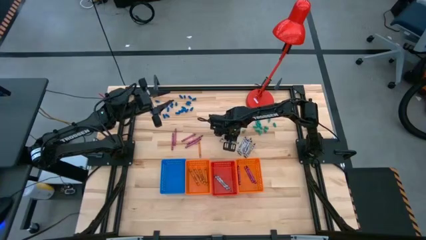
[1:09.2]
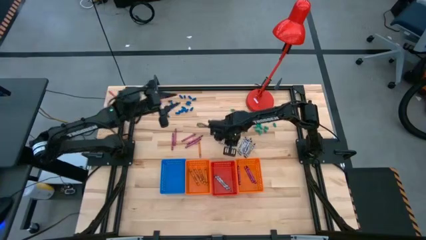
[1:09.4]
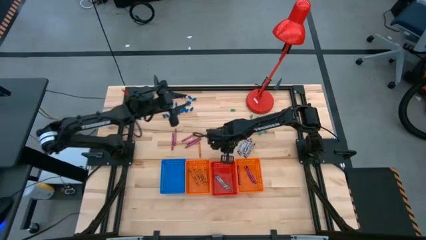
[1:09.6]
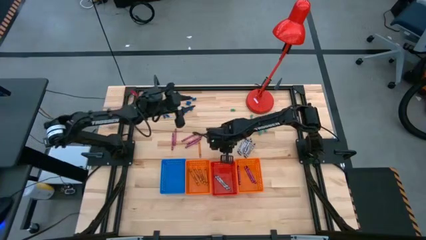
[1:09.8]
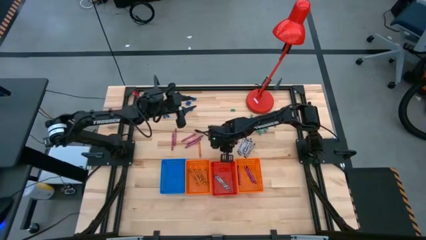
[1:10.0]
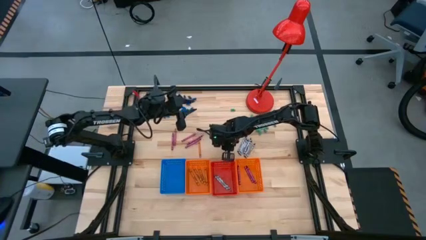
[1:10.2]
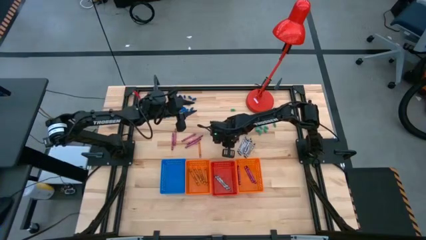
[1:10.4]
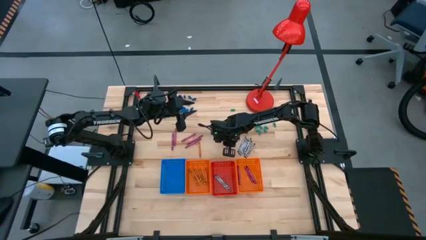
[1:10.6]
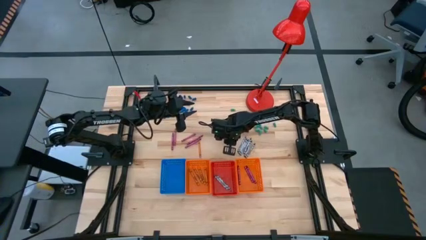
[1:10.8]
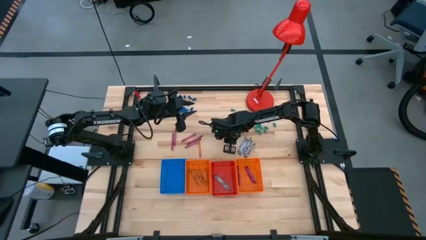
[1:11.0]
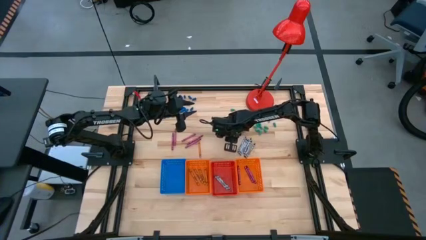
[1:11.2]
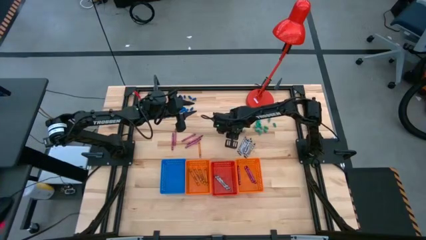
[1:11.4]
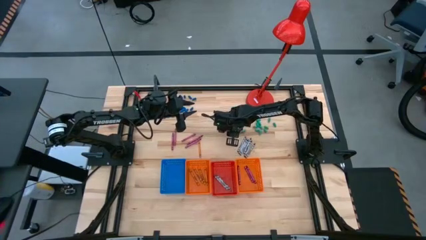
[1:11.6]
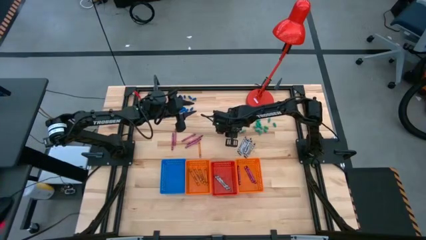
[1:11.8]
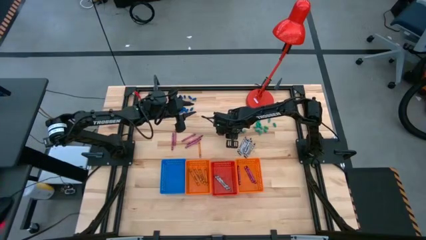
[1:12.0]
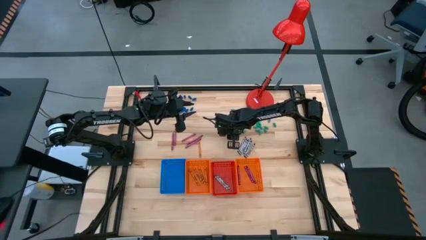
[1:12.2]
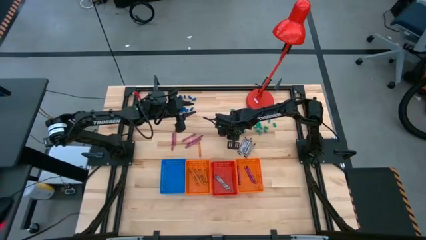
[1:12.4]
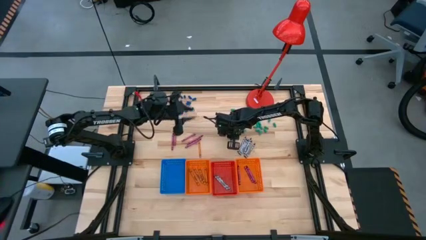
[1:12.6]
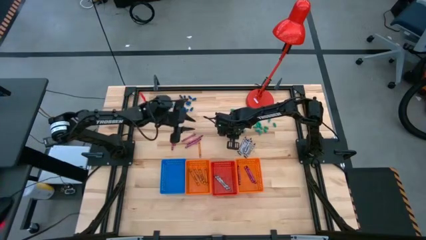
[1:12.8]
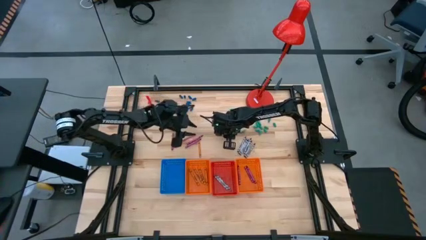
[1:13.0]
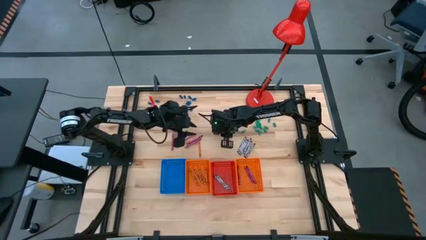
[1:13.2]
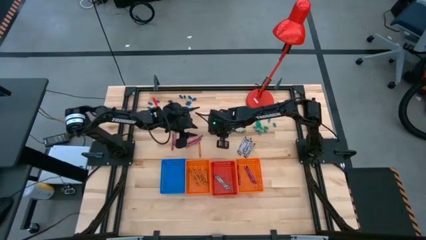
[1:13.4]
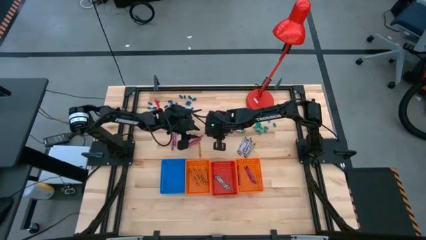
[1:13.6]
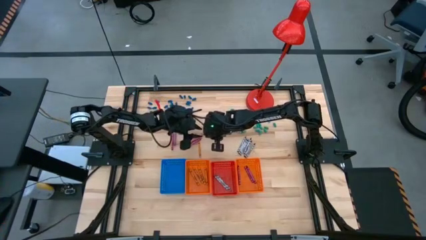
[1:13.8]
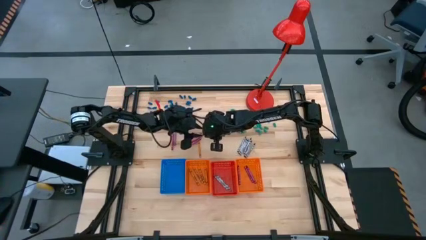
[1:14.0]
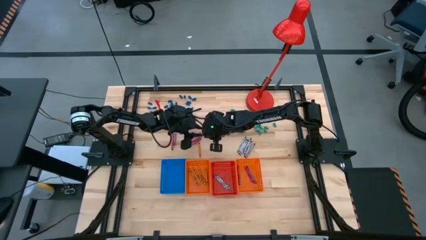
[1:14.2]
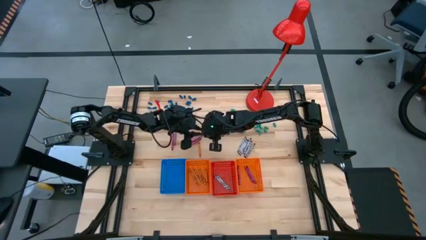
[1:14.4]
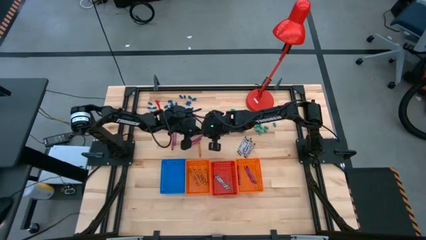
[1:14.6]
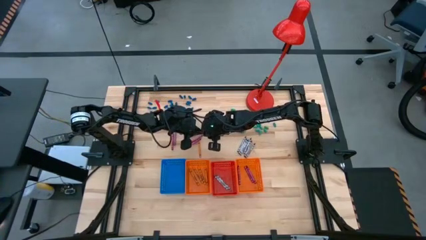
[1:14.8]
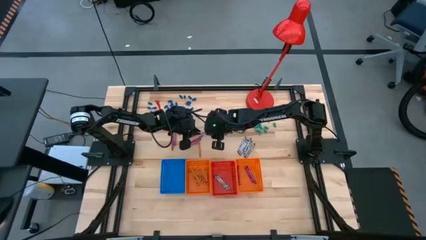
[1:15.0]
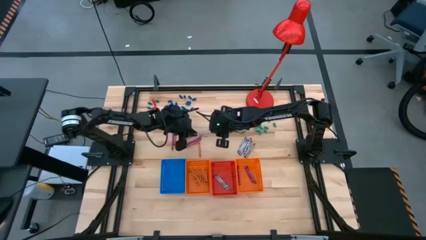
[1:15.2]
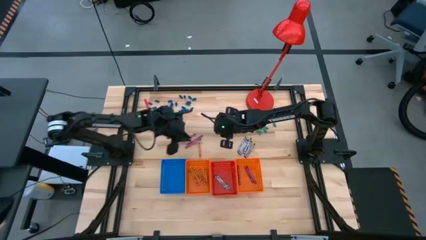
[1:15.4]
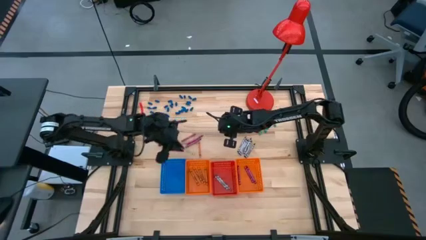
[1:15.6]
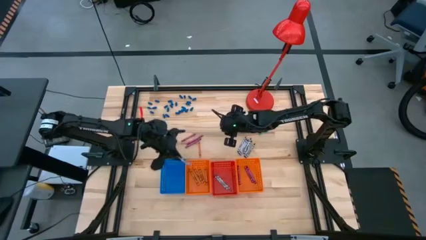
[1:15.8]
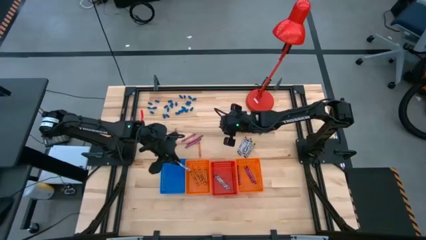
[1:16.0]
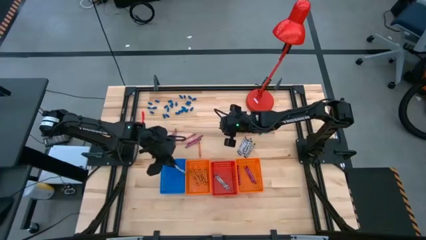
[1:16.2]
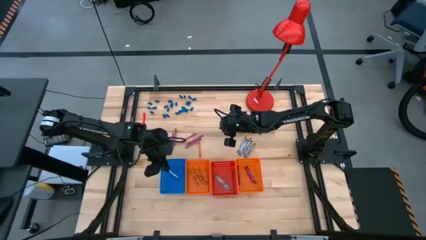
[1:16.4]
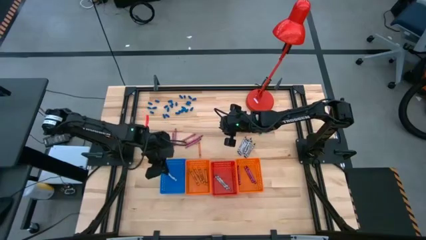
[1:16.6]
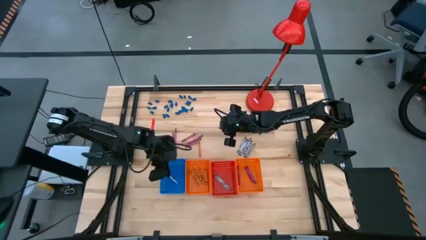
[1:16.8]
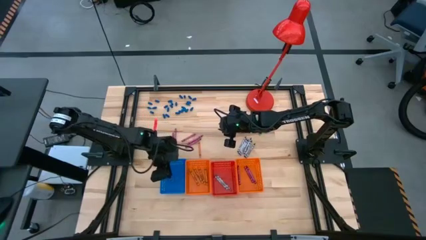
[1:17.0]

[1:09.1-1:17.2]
Task: Sort crayons
Put the black crayon into the blue bin

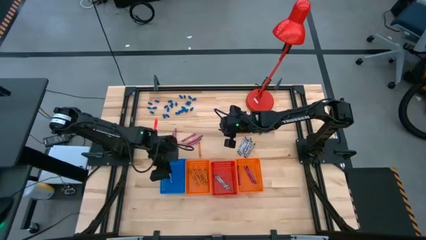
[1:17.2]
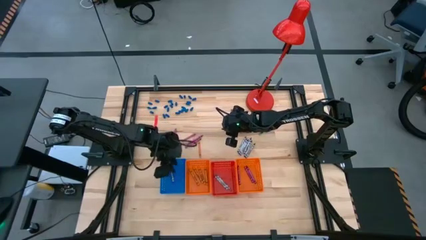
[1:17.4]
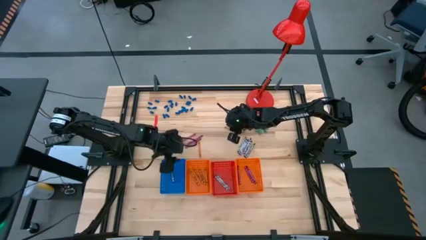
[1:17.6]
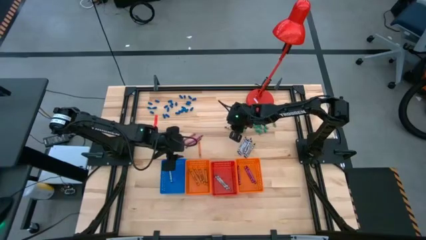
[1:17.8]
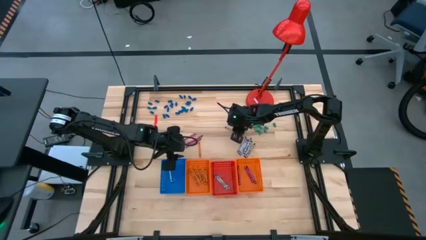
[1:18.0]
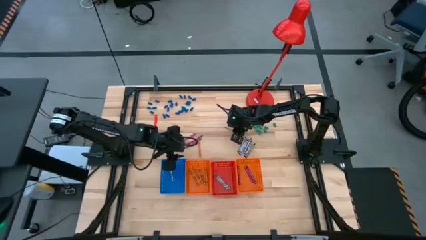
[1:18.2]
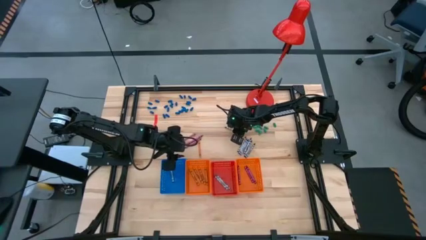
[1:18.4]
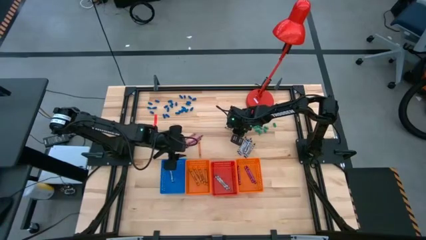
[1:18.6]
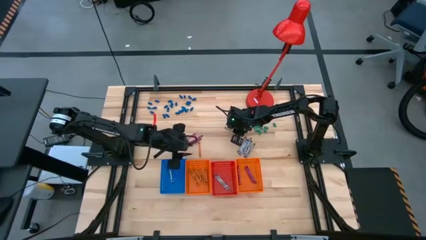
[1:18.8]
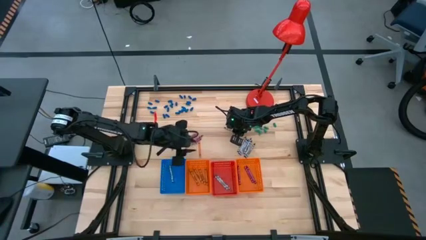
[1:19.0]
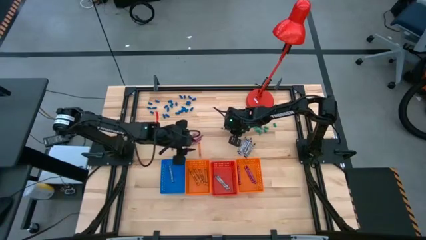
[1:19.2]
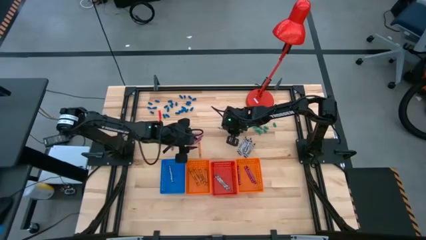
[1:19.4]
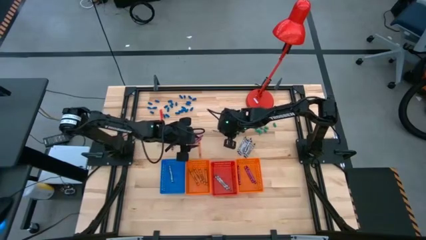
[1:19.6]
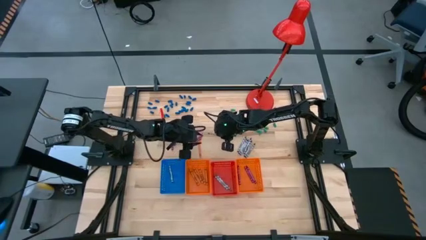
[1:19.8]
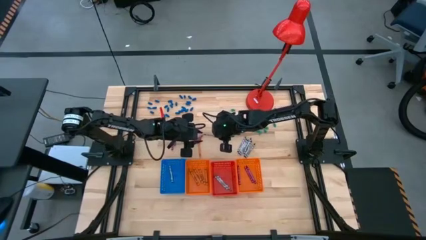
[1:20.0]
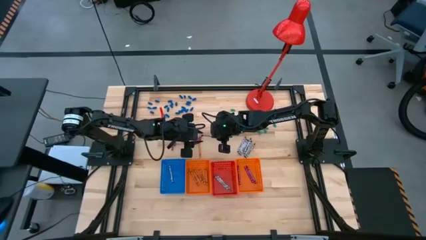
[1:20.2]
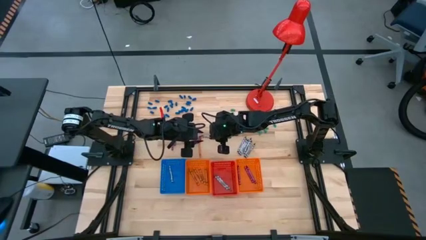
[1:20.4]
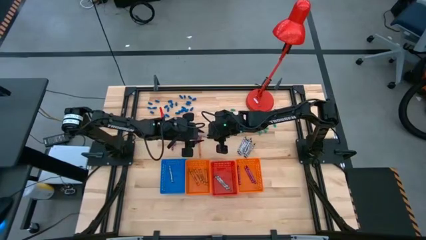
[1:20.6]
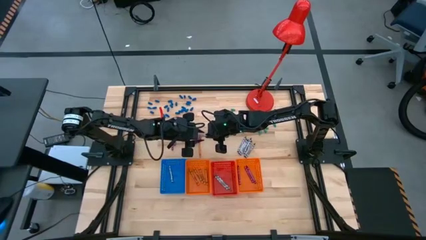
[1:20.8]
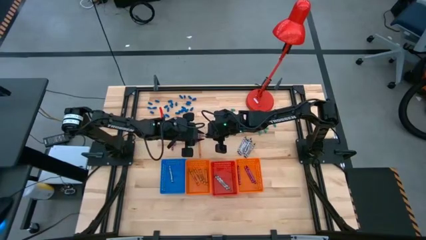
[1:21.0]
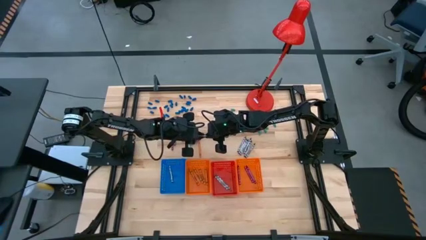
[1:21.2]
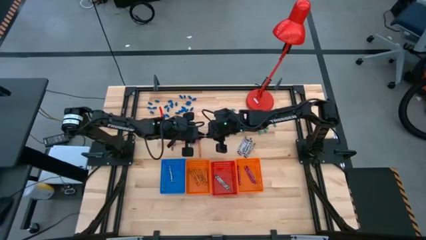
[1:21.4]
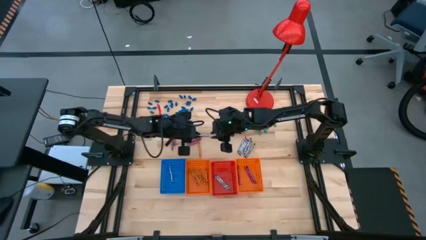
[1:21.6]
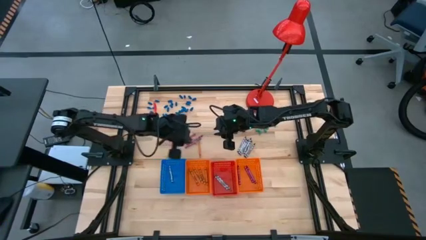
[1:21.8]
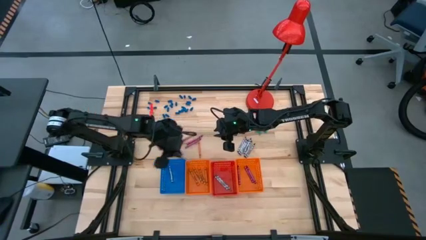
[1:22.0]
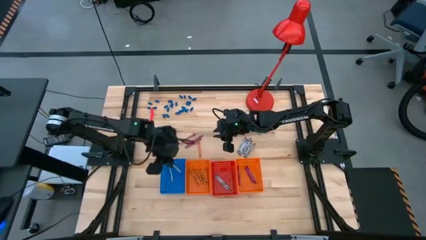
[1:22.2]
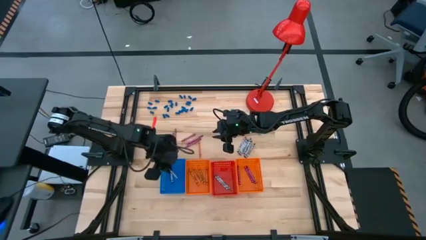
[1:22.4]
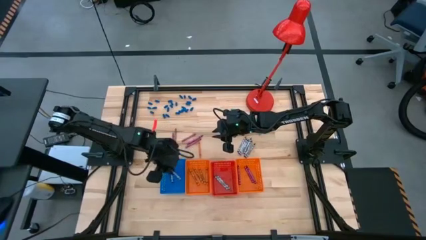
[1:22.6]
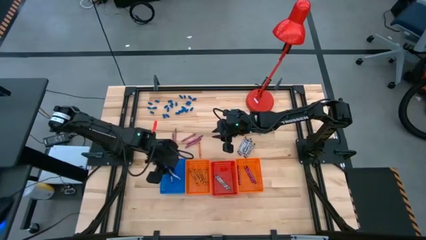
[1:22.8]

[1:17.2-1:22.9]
Put the black crayon into the blue bin

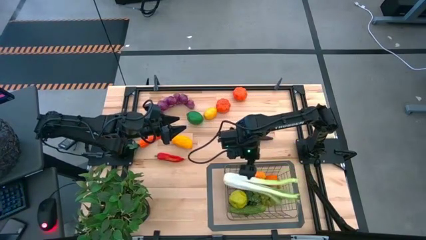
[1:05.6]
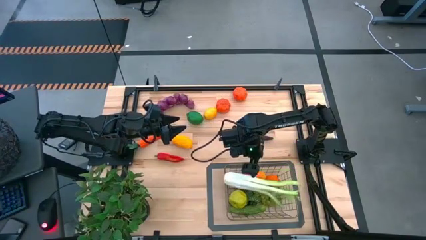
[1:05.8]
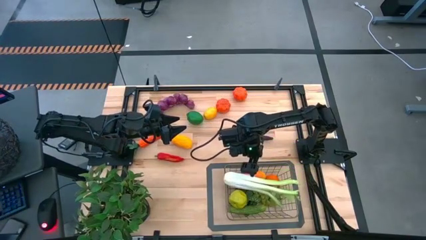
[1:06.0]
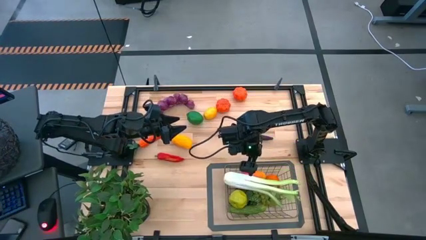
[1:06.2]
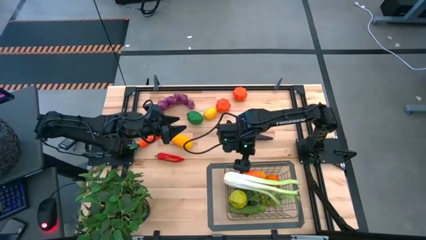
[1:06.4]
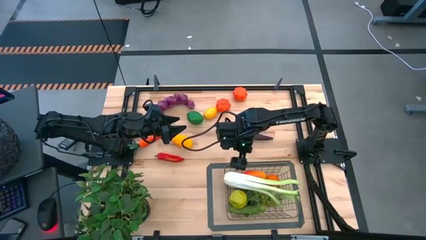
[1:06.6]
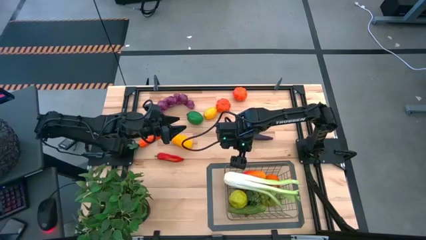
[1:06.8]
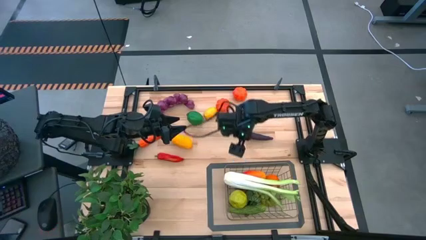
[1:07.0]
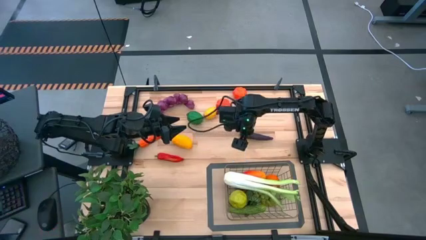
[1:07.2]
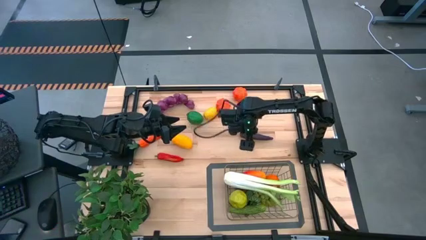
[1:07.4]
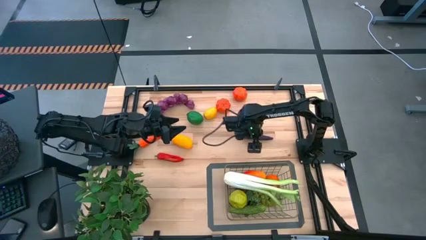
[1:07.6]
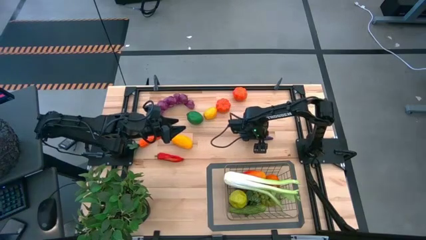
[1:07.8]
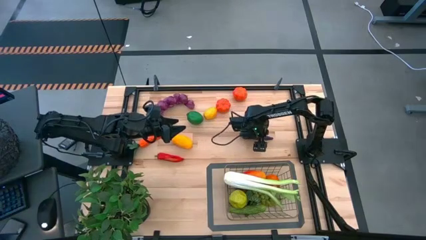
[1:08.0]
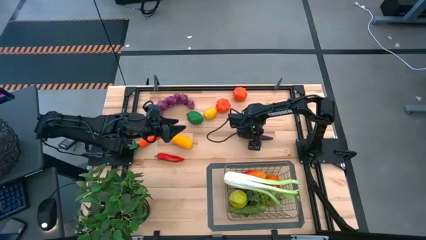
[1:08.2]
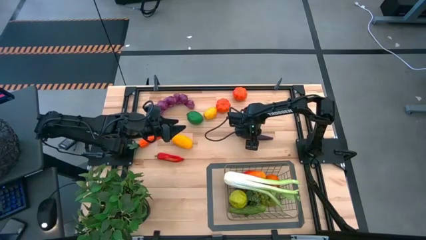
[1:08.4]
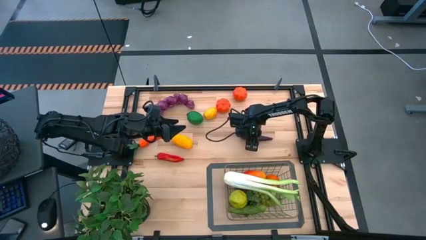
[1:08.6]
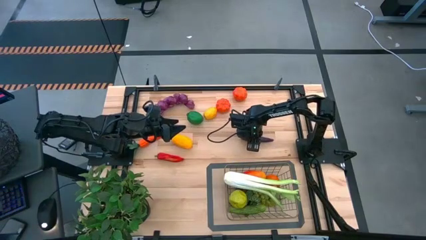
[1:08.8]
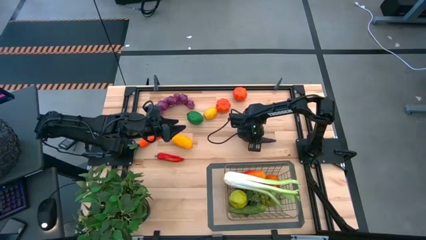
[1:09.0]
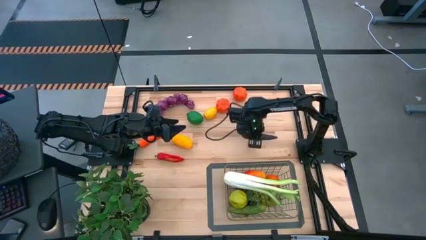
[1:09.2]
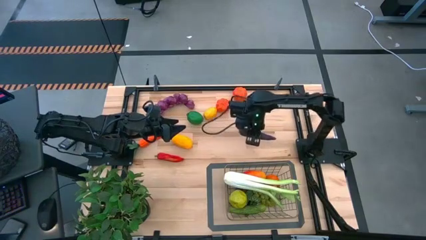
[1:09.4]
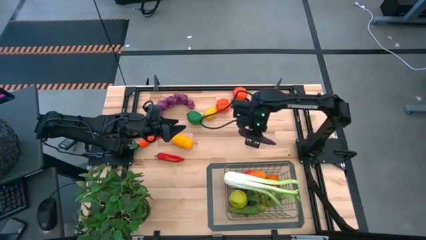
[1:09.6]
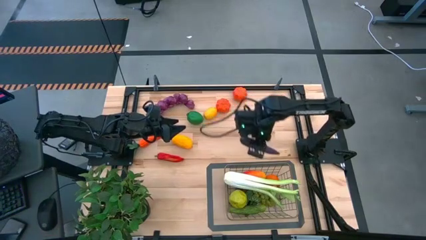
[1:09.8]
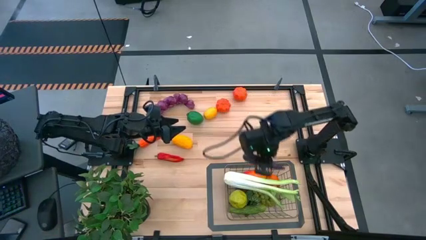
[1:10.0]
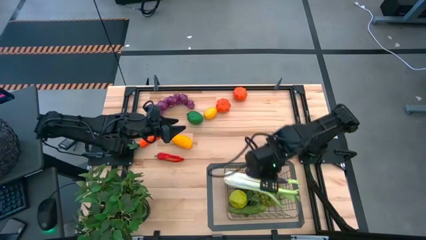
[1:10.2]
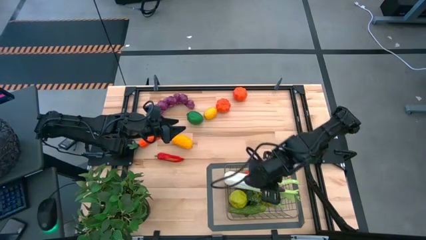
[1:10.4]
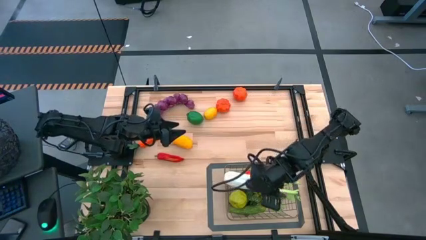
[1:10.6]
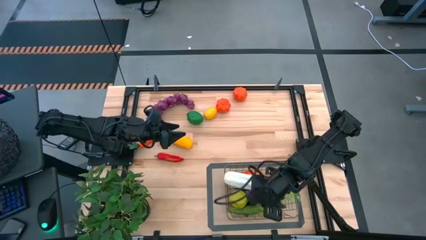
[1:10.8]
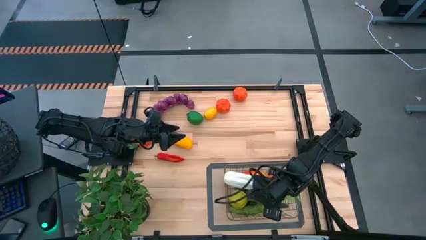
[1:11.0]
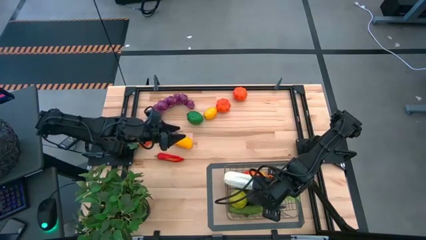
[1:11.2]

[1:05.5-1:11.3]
Task: Build produce basket
Put the eggplant into the wire basket
